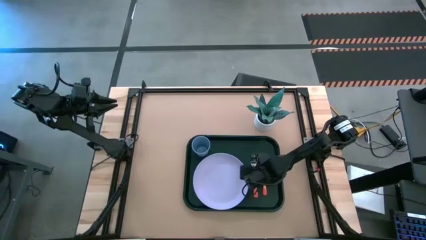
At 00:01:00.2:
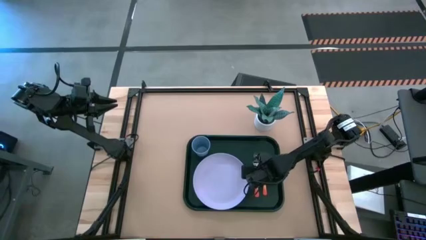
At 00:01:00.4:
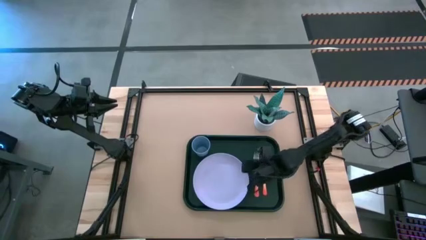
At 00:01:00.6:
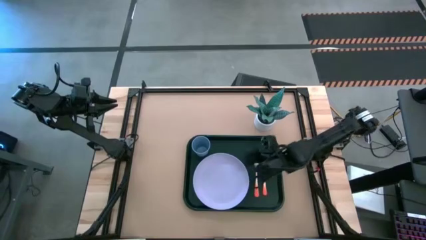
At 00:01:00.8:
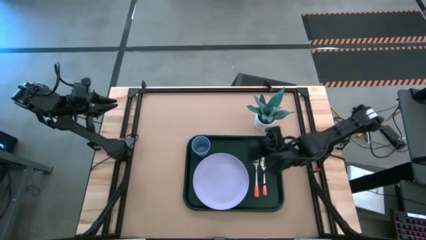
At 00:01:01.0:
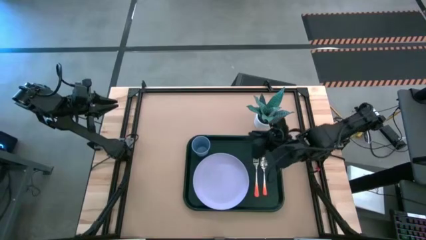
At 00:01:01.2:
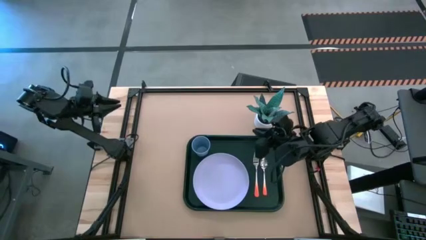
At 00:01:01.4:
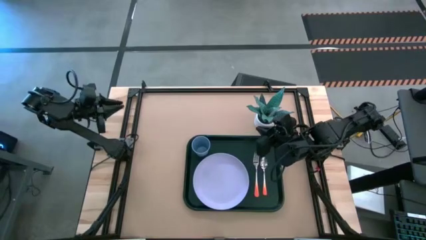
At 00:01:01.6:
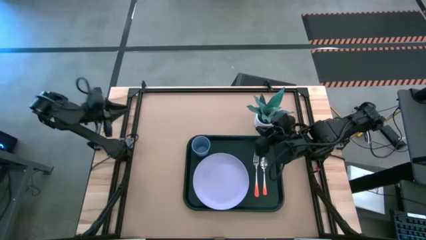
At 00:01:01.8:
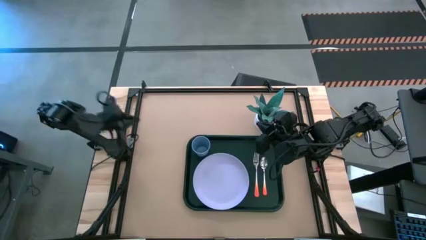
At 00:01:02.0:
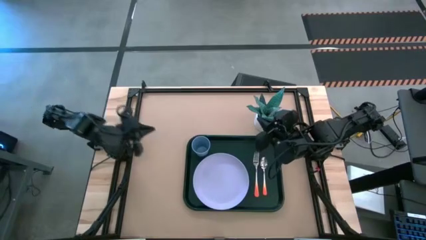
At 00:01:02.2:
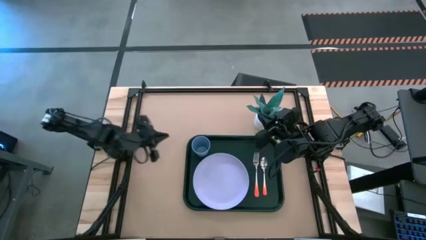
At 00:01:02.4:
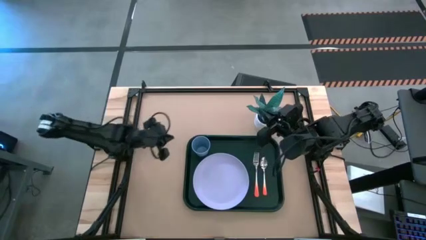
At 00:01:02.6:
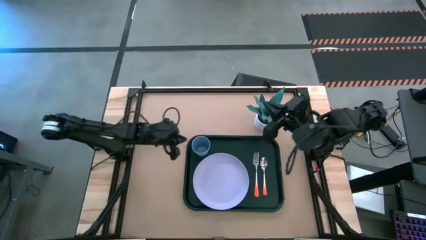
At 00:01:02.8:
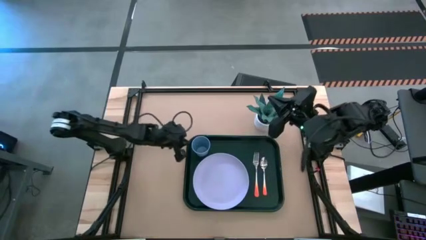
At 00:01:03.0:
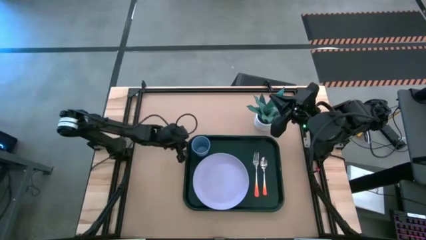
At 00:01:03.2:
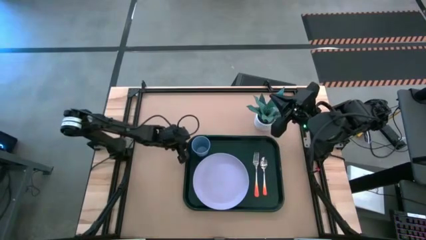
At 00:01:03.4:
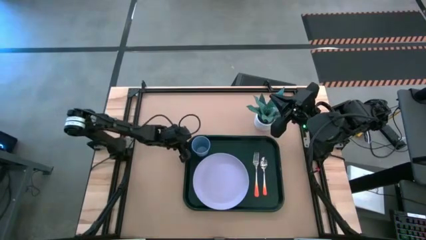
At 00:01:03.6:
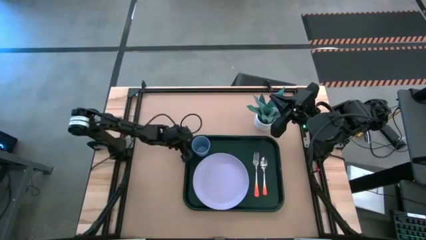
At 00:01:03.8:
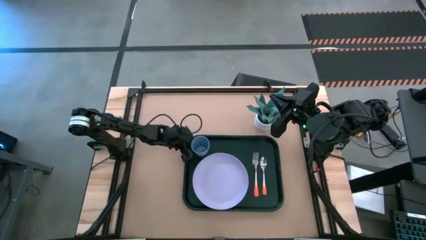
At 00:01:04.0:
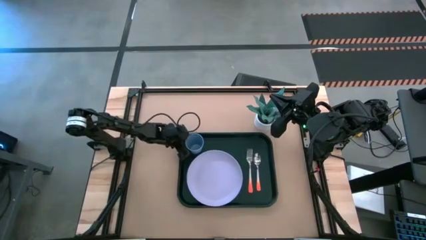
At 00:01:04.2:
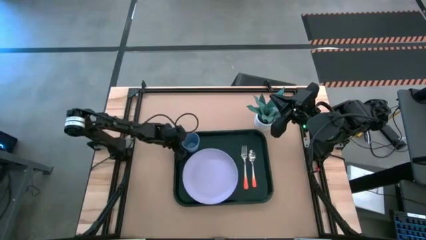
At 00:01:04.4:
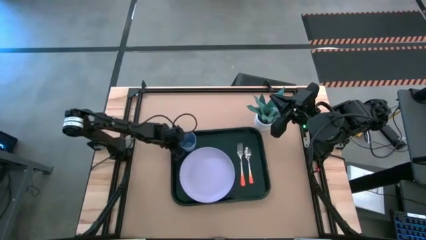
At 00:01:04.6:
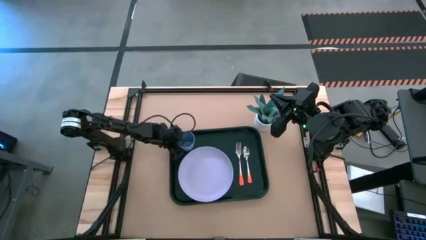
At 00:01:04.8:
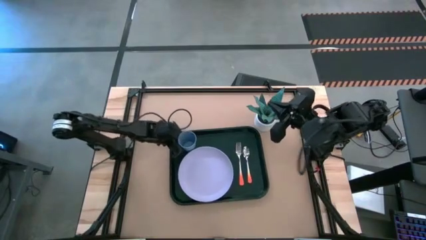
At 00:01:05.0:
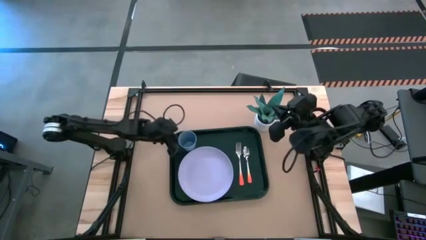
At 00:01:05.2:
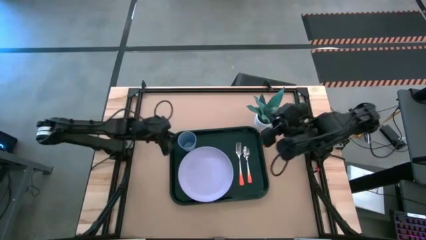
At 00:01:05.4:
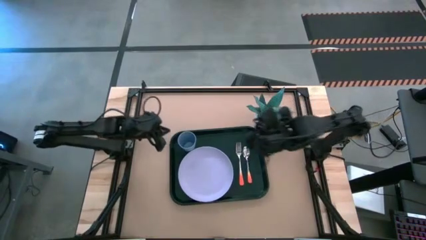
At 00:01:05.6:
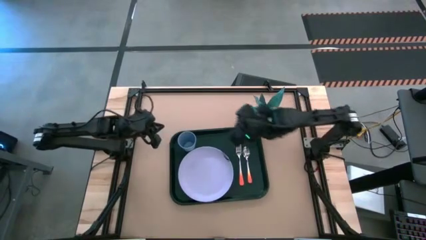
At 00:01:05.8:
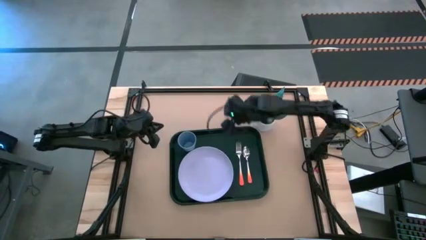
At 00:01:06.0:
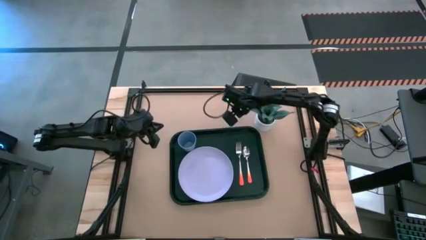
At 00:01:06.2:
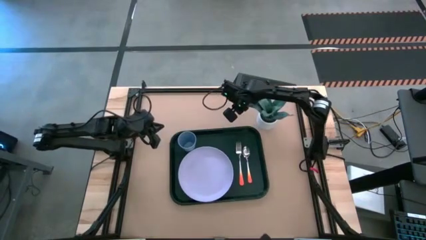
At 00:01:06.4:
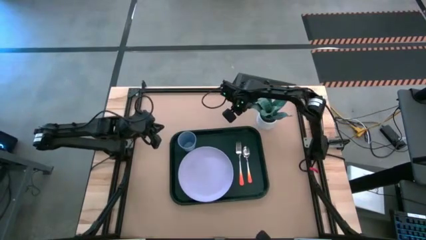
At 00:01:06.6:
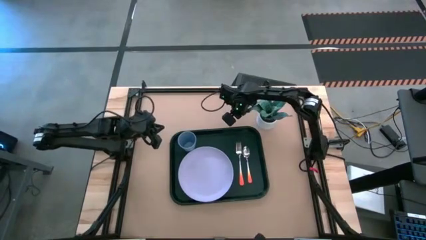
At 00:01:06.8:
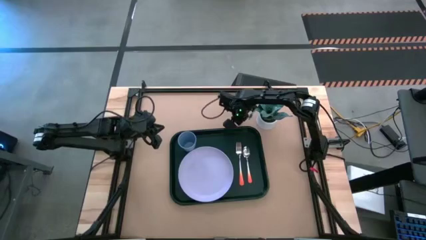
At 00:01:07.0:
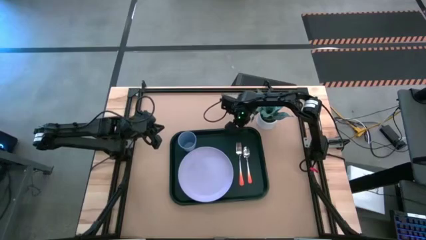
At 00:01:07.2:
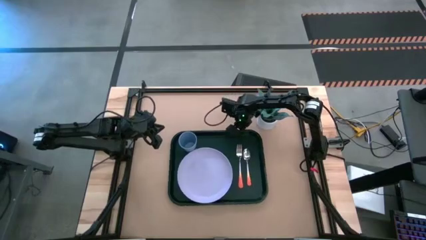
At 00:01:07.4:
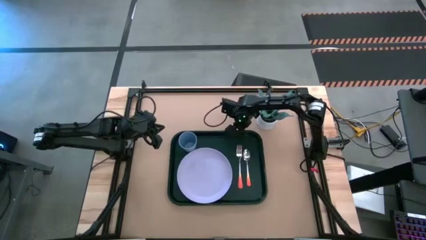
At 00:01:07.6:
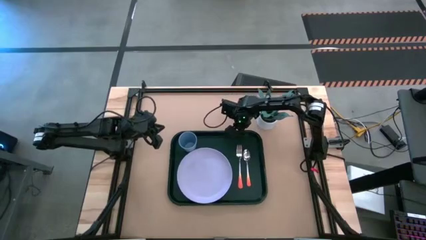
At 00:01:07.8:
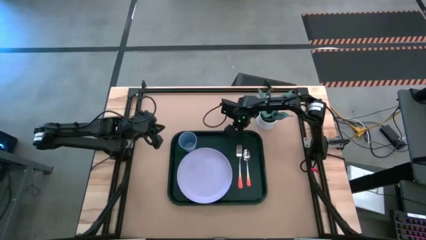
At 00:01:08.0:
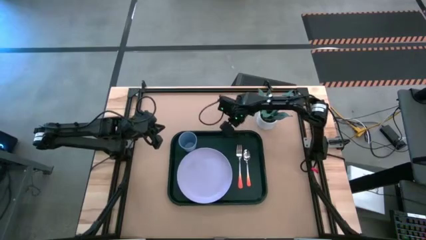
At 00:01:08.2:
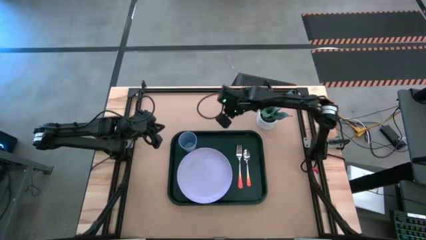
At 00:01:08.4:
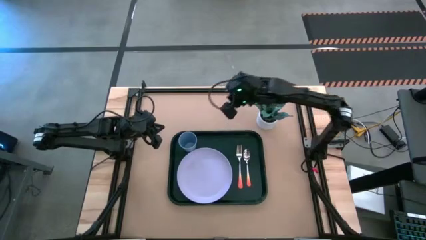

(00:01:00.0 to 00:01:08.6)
Task: Pick and place plate/cup/fork/spoon on tray
Adjust the dark green serving tray on the table

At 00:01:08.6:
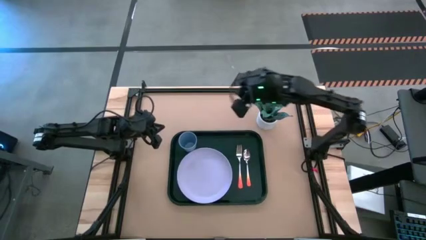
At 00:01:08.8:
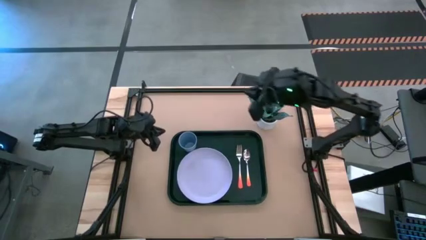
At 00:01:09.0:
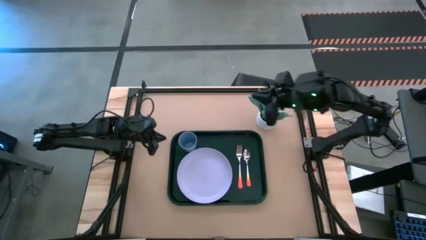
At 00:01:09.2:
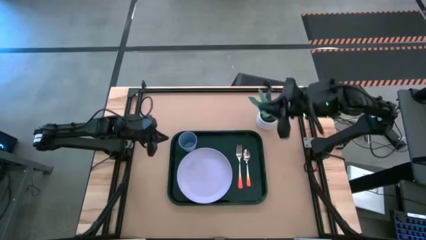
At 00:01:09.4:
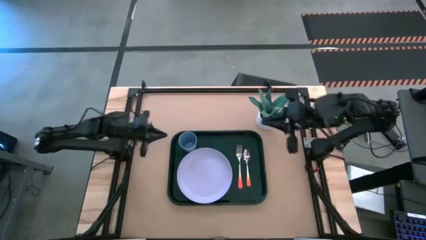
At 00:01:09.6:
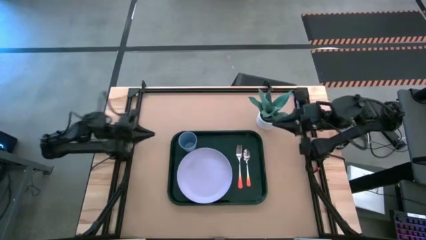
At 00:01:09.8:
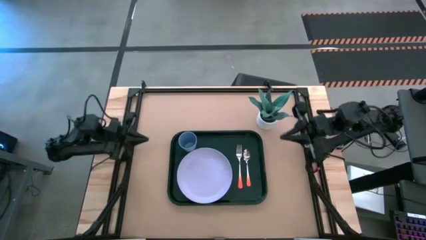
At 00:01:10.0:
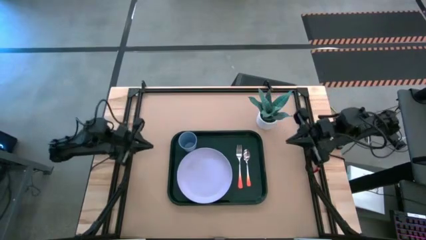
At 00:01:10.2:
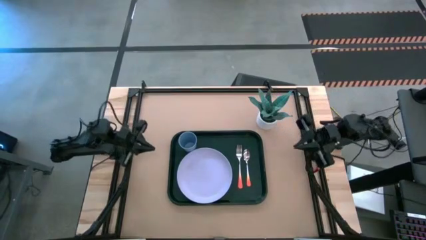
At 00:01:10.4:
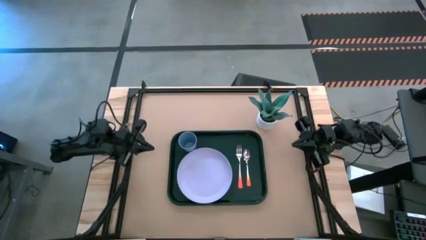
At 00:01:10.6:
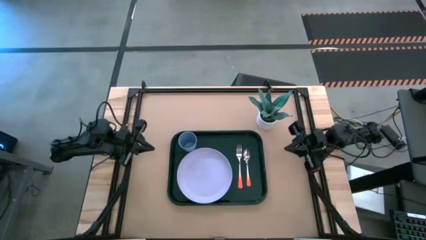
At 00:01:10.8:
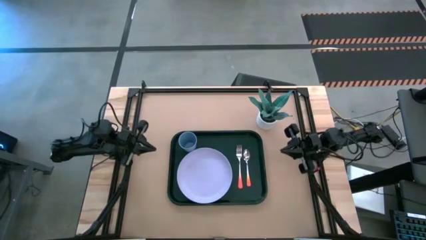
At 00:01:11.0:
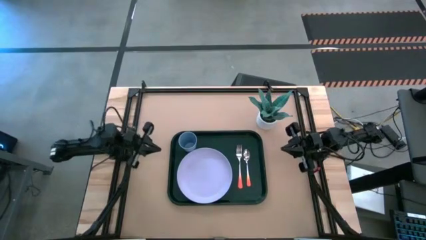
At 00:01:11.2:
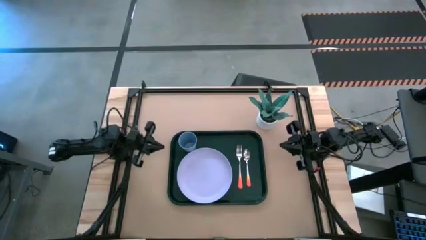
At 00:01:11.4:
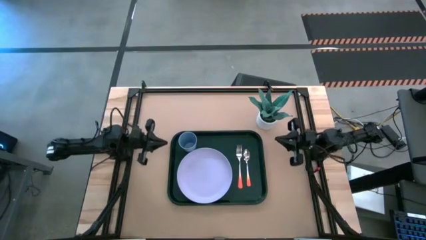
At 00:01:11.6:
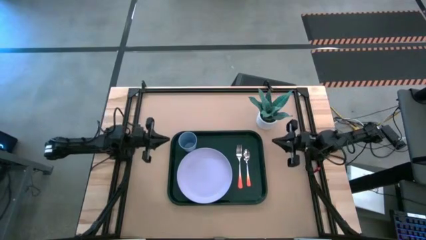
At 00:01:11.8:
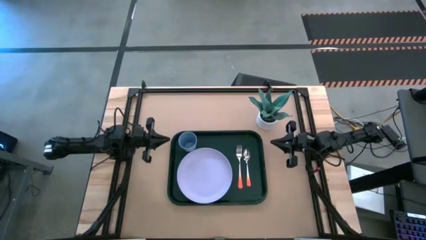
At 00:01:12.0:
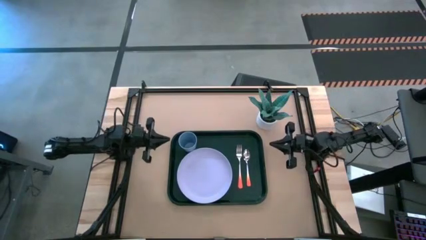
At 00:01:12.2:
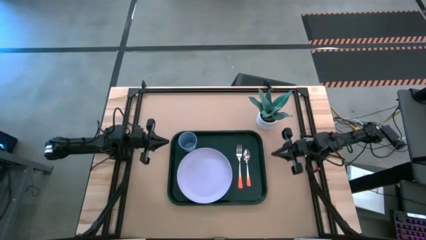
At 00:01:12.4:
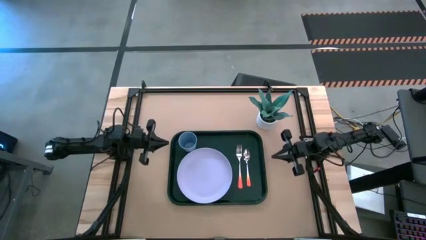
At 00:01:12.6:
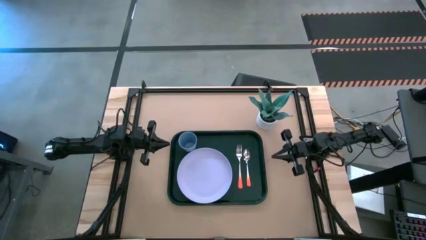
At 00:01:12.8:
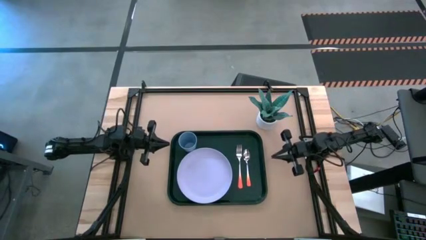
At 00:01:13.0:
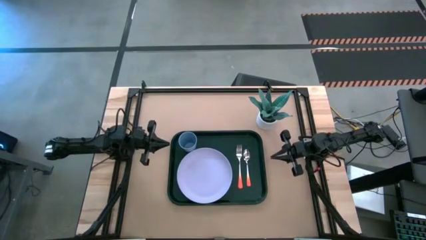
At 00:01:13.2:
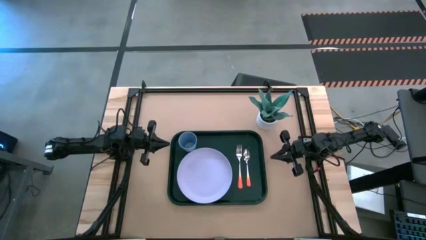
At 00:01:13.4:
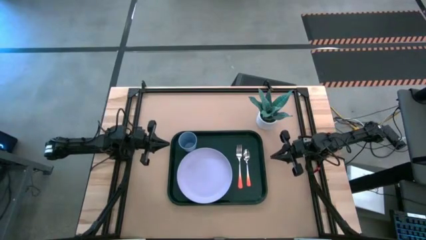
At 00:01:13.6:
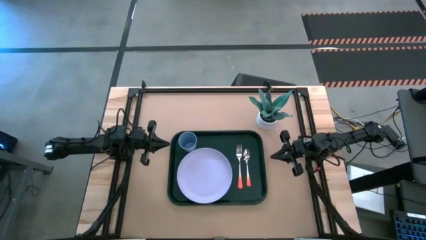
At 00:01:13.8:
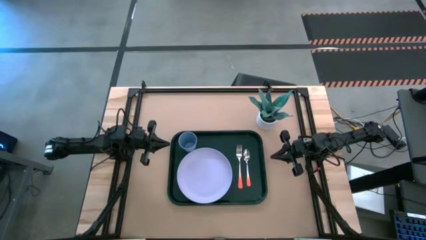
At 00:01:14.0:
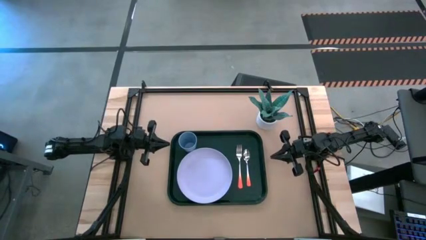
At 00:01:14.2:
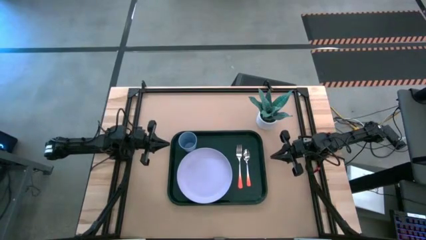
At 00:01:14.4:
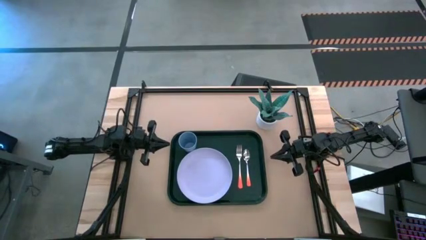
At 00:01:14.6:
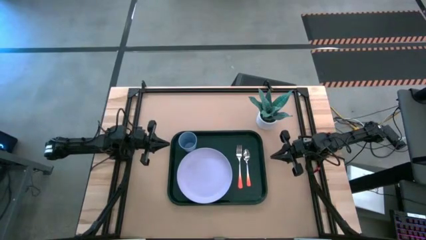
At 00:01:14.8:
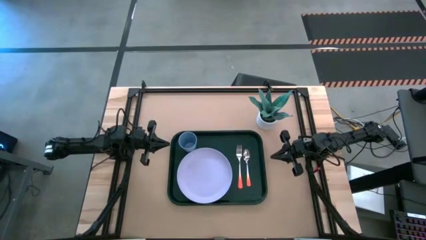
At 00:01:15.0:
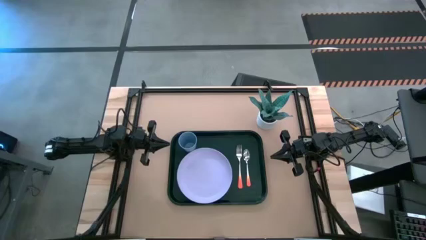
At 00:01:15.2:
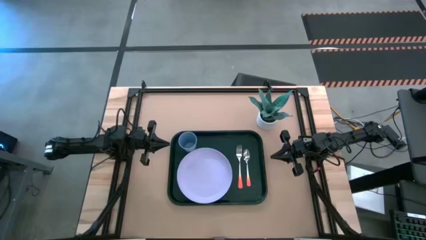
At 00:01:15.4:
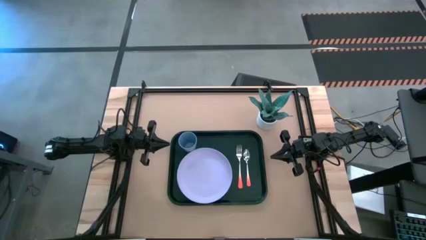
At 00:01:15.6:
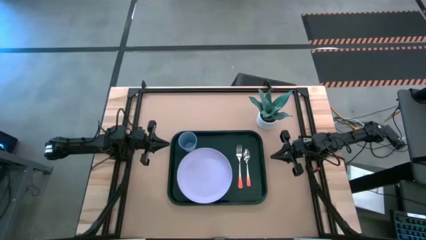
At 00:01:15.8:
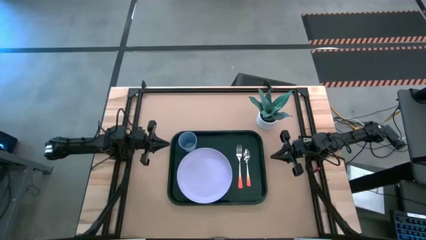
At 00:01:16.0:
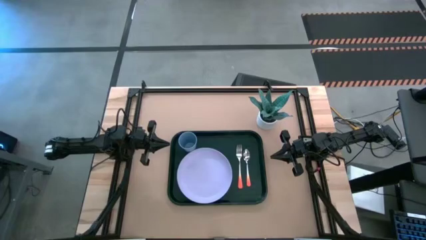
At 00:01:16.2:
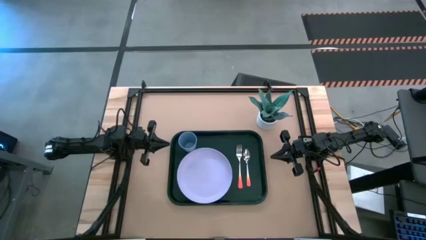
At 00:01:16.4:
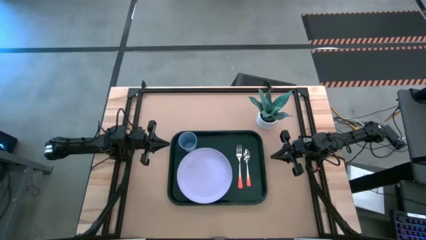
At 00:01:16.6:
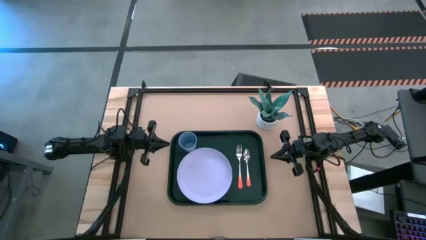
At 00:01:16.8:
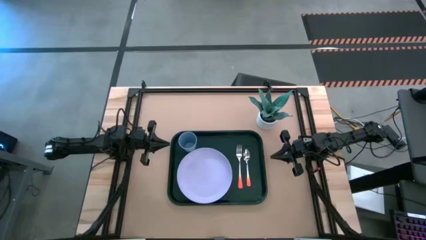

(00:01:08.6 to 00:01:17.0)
Return to Home Position
